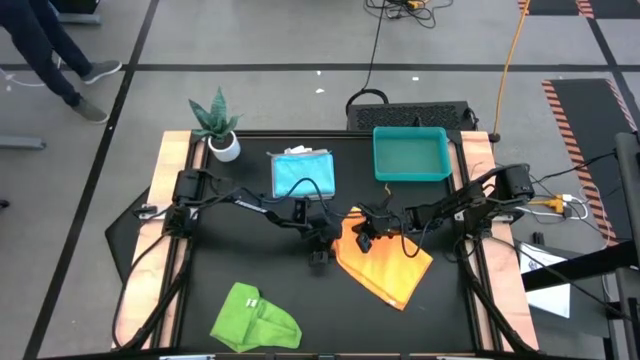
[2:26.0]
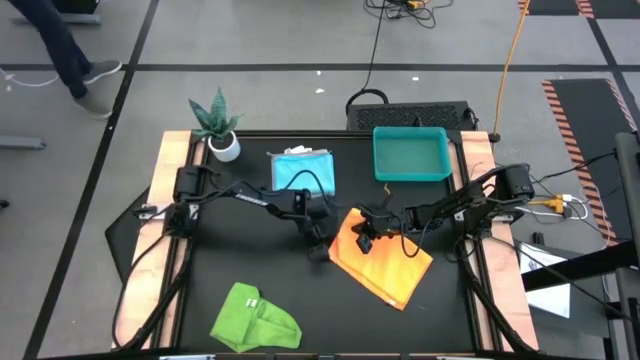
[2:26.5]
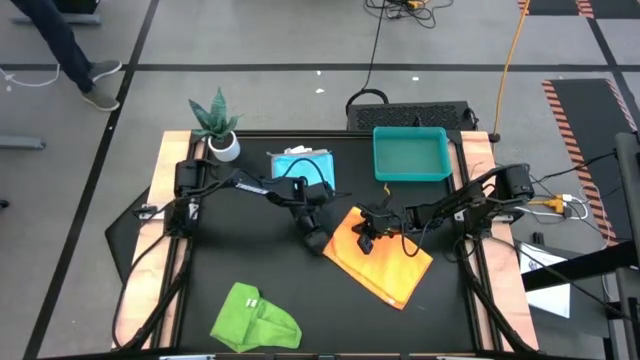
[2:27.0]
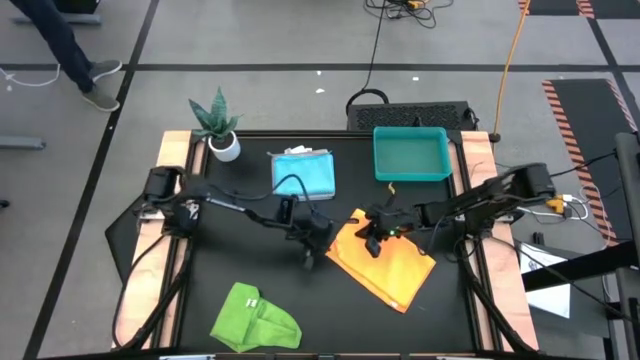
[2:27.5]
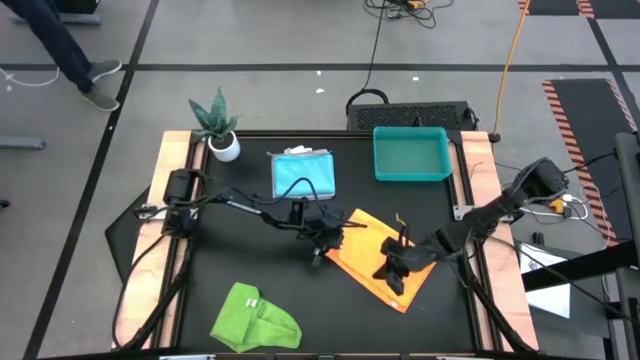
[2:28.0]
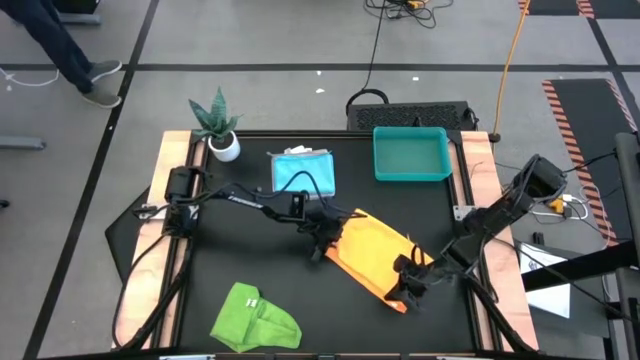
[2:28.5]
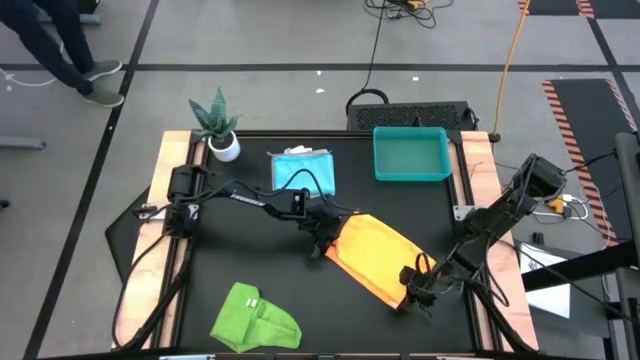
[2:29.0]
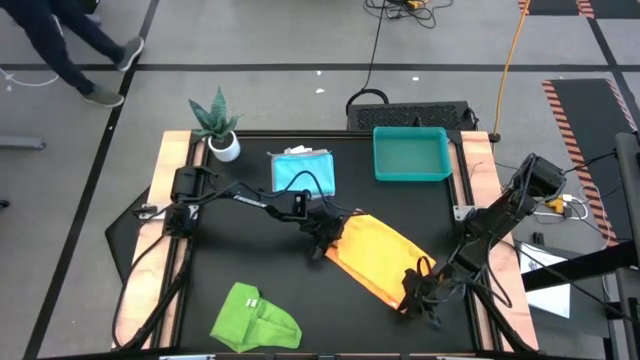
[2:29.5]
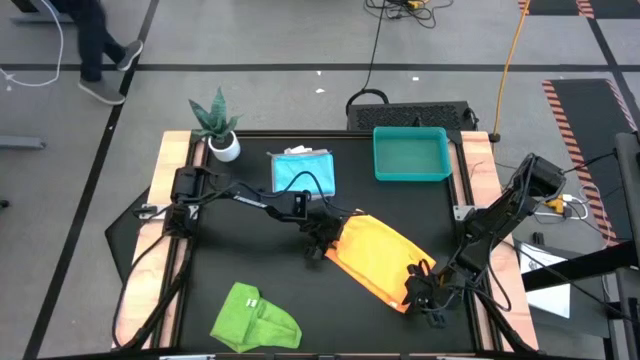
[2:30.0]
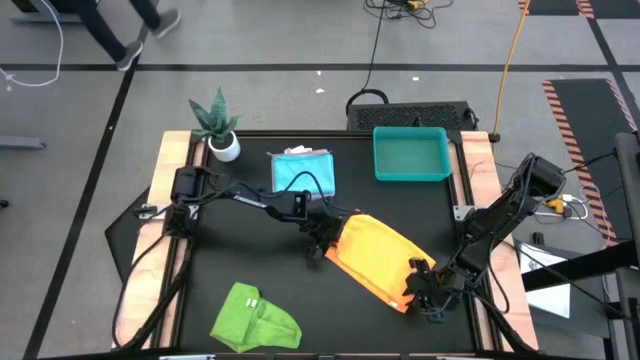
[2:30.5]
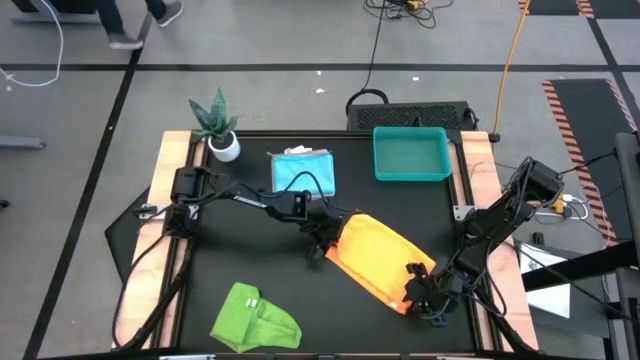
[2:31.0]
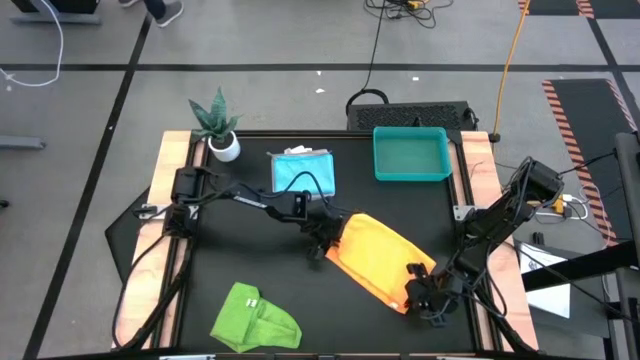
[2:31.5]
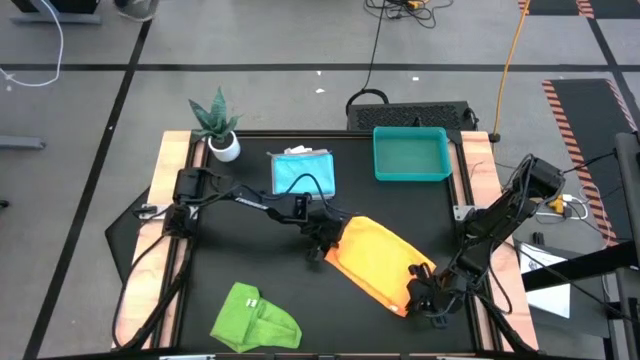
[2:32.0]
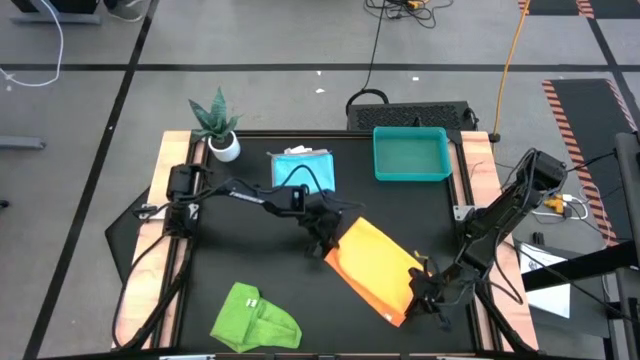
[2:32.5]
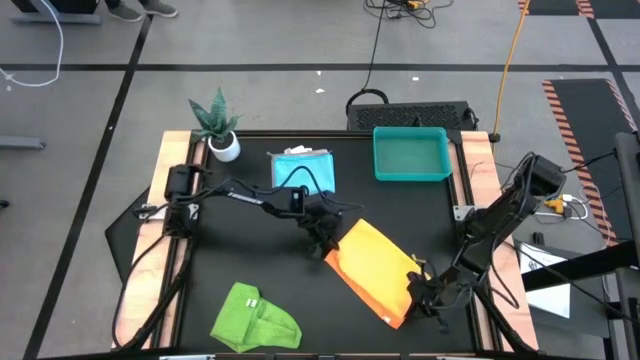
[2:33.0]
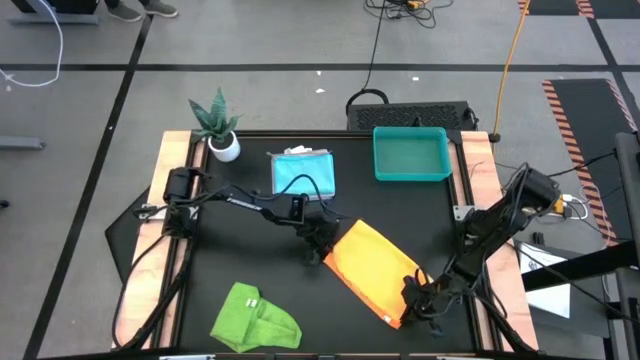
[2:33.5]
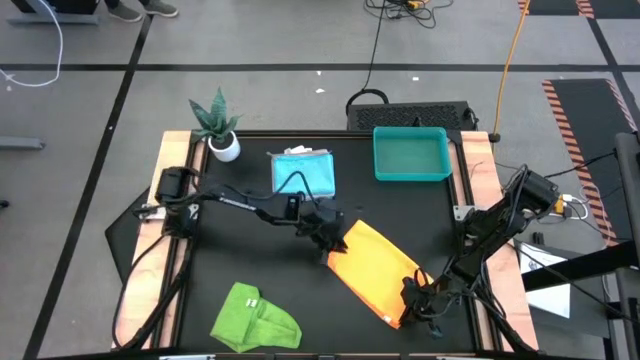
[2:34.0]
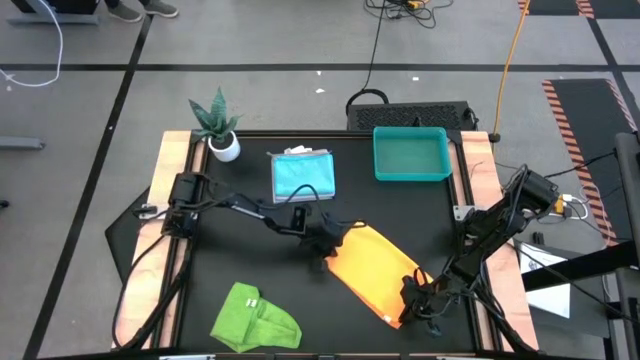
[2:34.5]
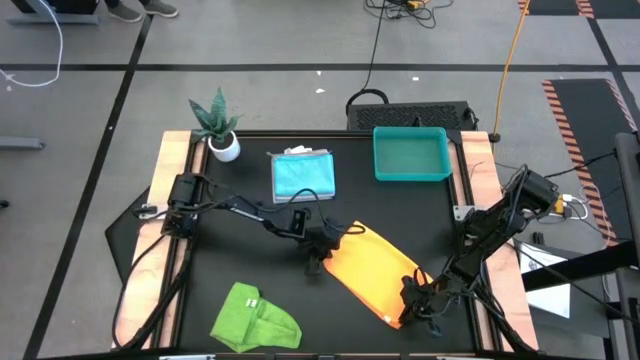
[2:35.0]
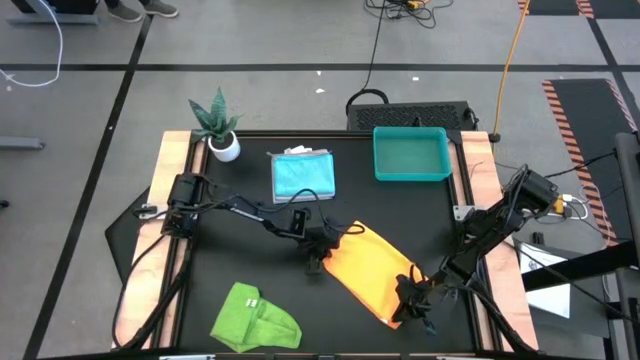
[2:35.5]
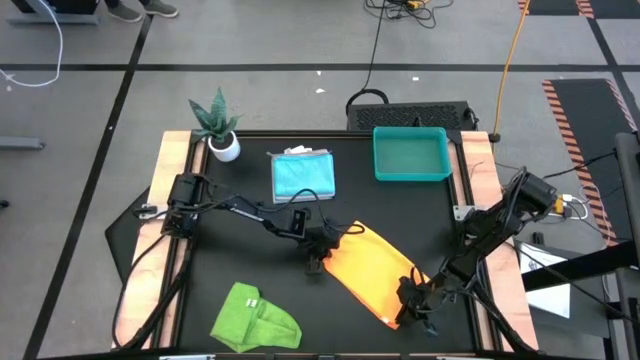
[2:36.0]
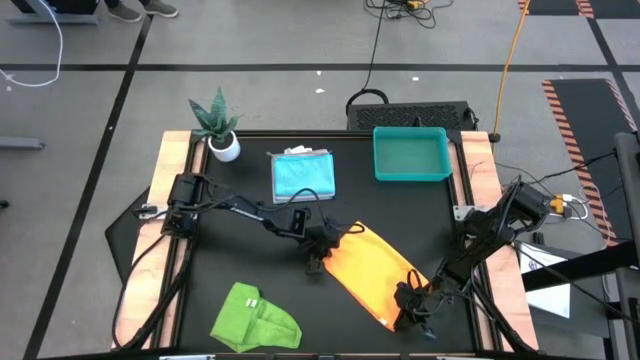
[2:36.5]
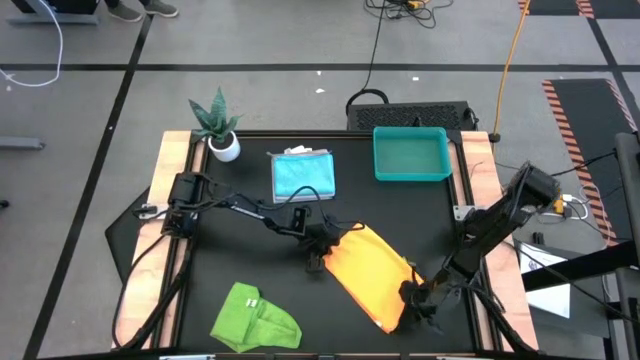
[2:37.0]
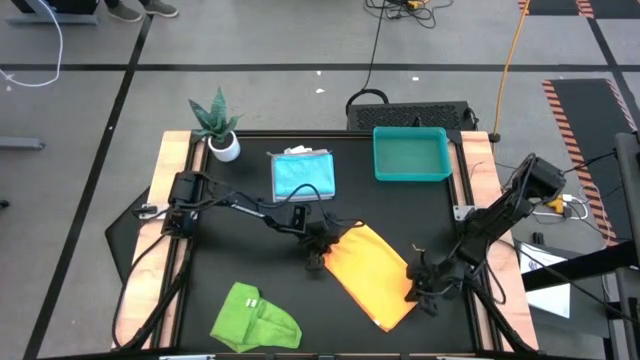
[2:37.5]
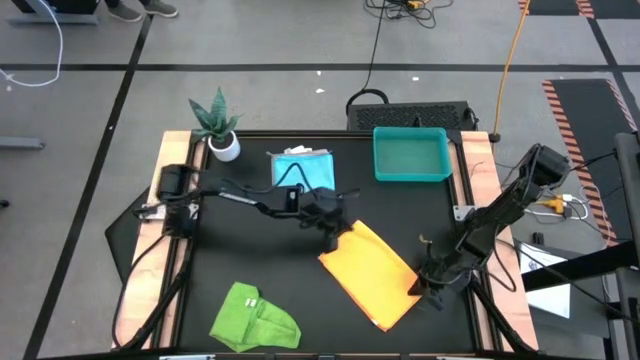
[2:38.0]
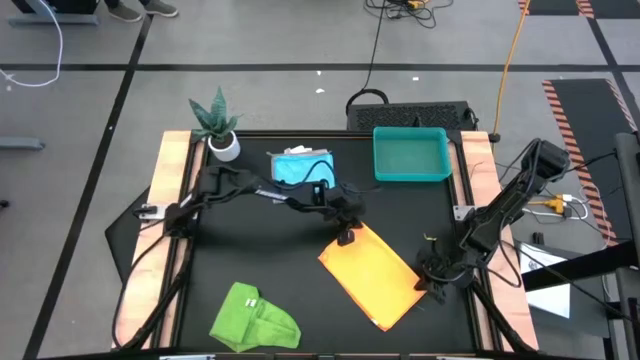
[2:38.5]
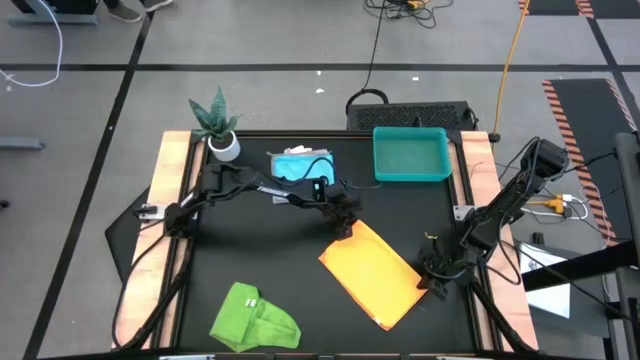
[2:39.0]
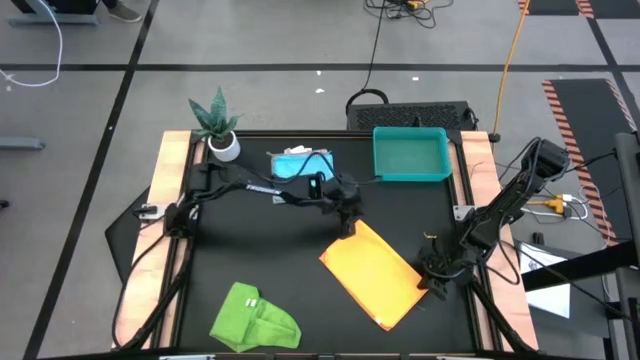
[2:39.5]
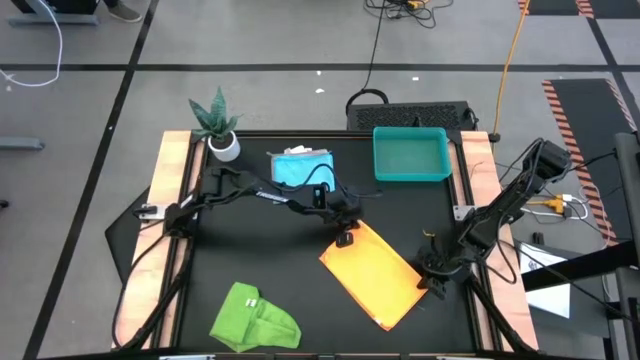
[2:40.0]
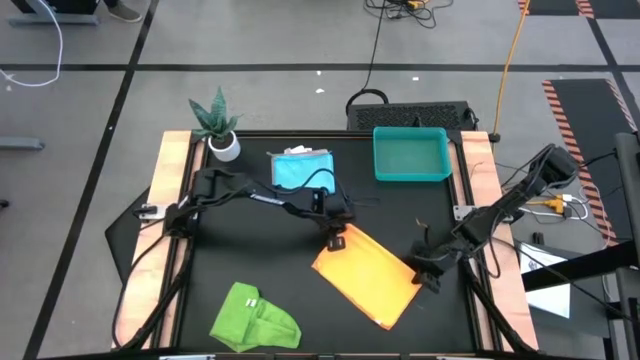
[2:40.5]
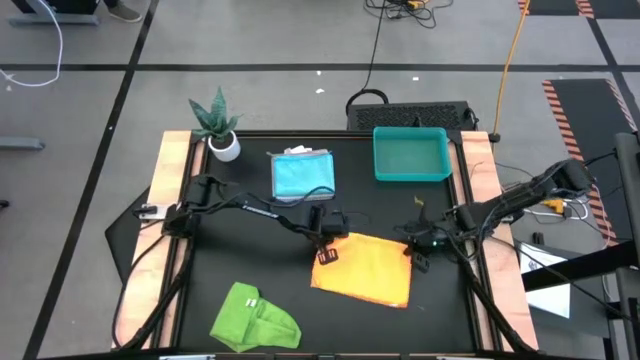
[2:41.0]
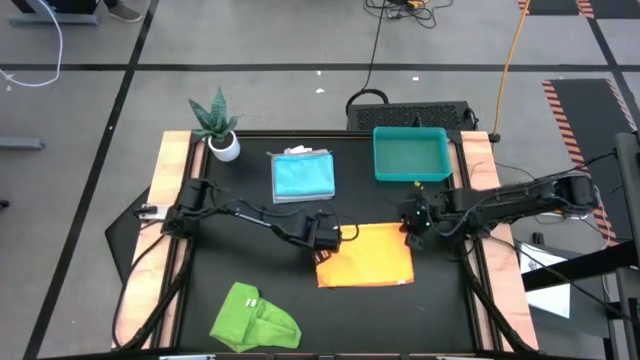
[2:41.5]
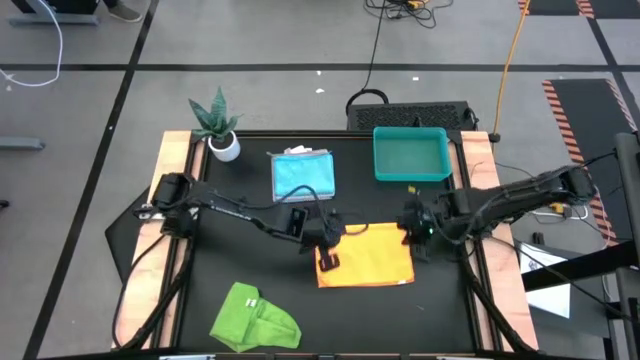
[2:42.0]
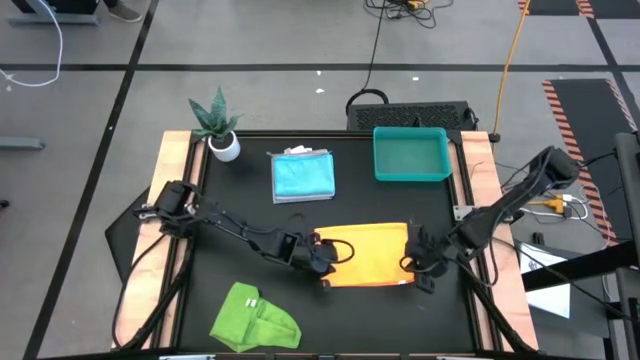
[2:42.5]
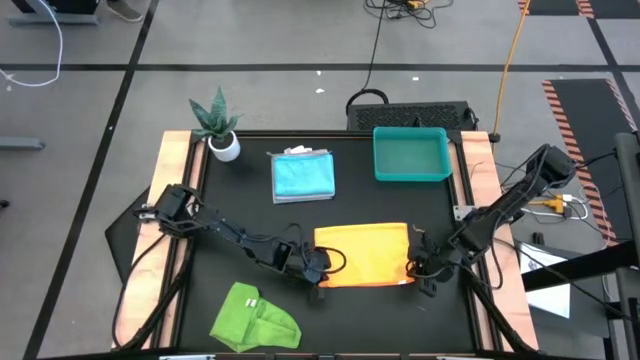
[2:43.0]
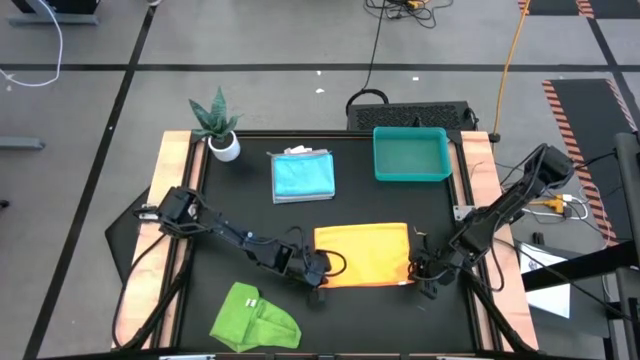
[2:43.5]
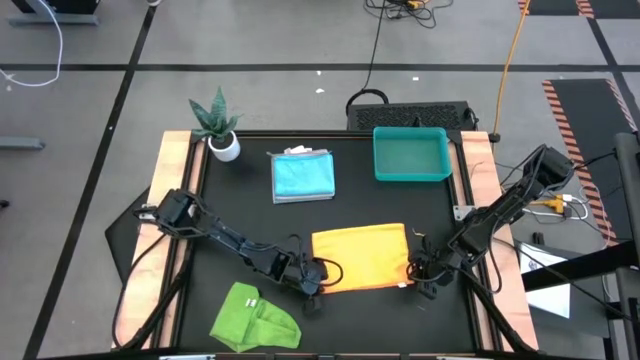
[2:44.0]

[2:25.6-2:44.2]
Task: Fold microfiber towels
Fold the yellow microfiber towel

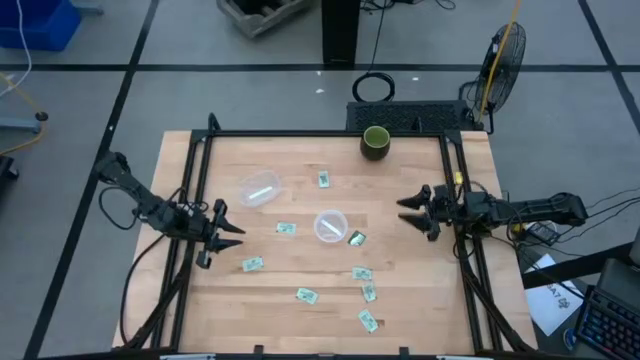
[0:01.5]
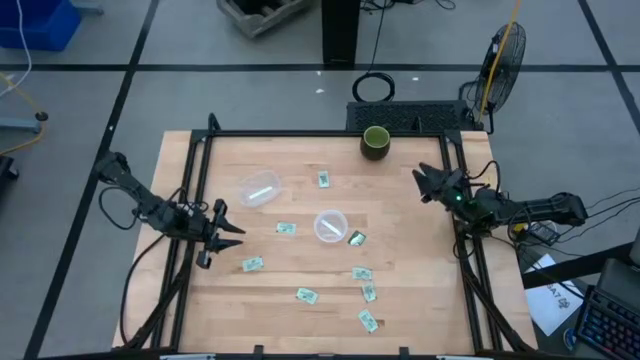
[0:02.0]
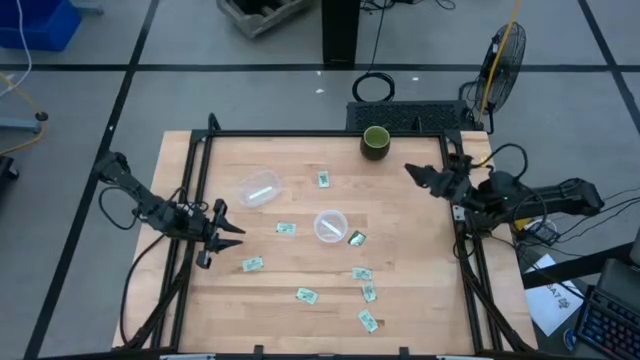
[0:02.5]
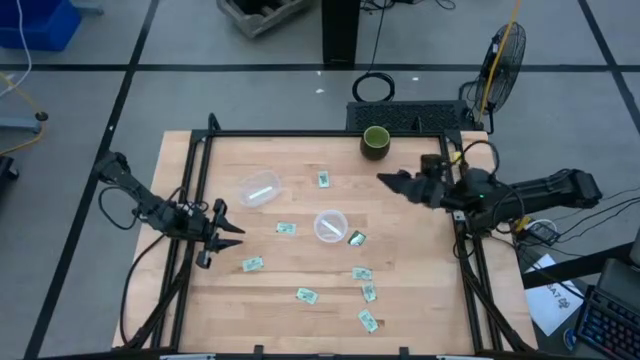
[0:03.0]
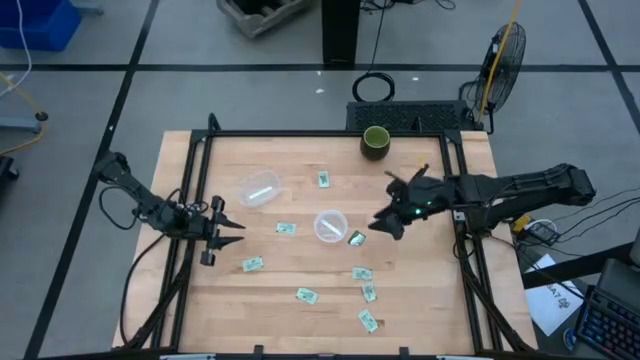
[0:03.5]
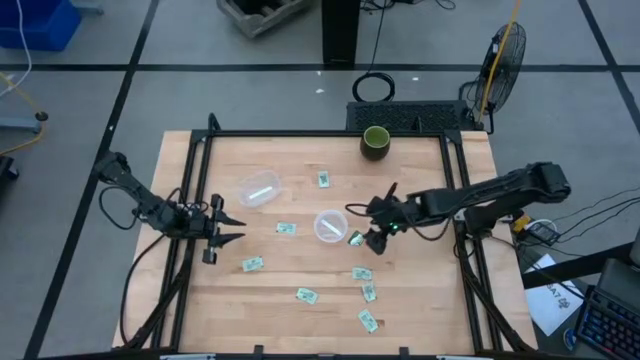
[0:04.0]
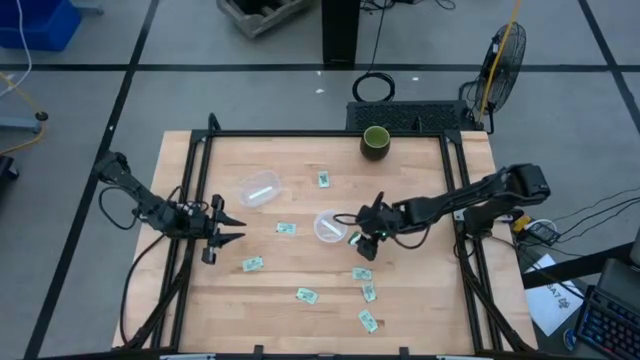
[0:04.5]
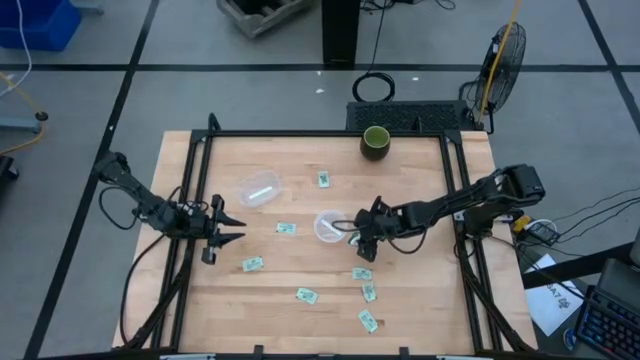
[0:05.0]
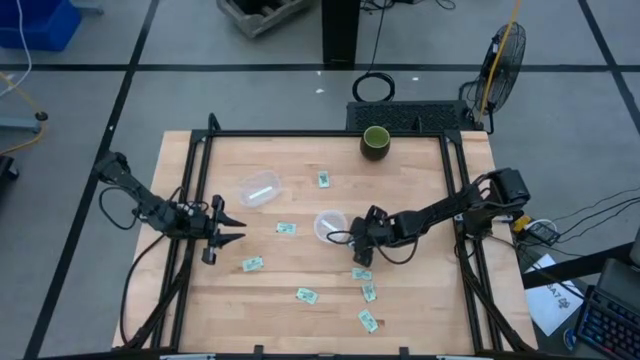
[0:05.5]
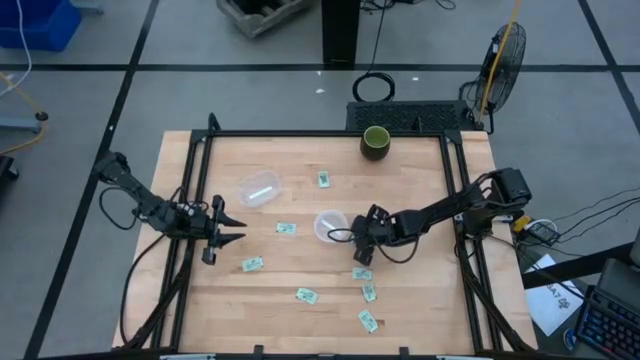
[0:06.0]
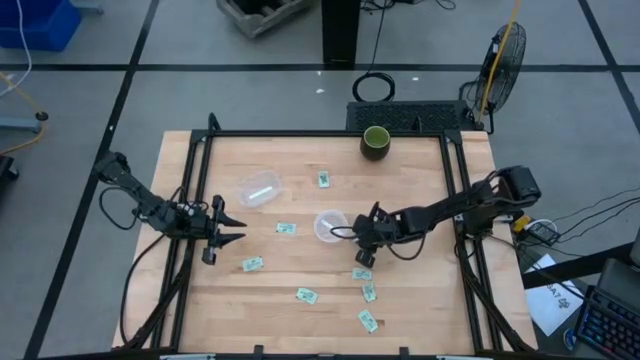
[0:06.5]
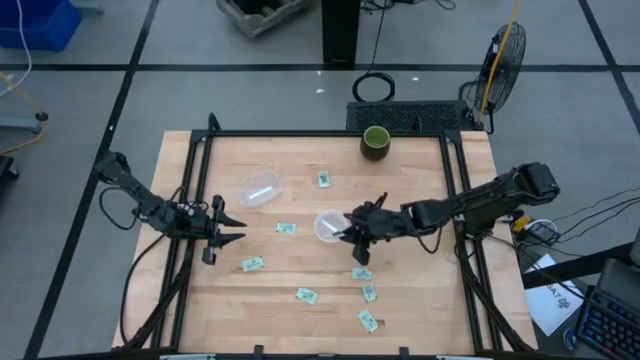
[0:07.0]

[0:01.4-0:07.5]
Task: Pick and place items into bin
Put the truvia packet into the right transparent bin
